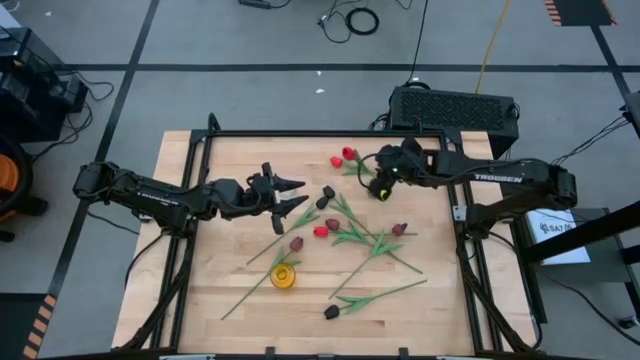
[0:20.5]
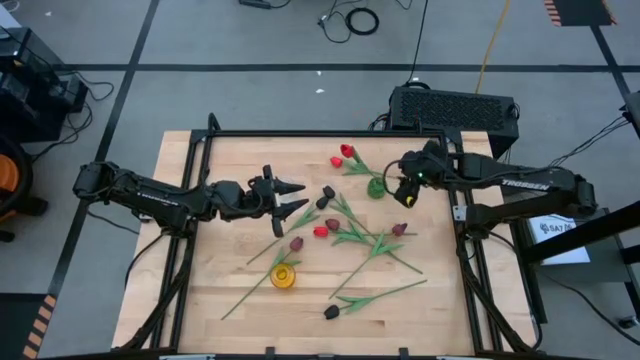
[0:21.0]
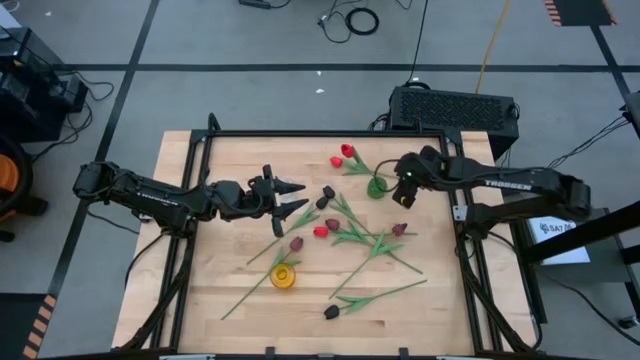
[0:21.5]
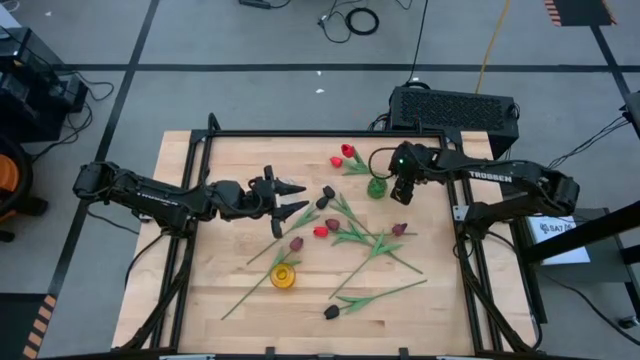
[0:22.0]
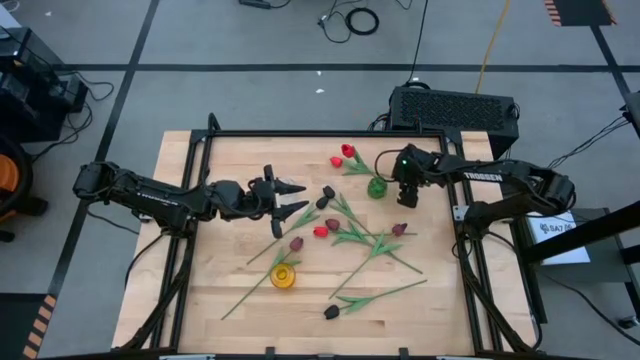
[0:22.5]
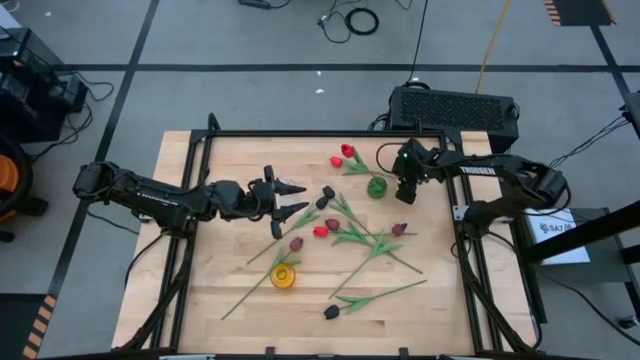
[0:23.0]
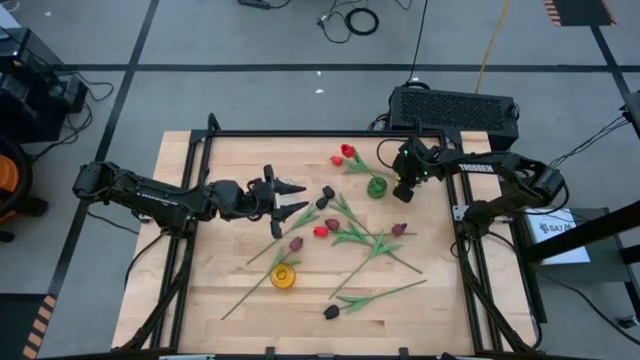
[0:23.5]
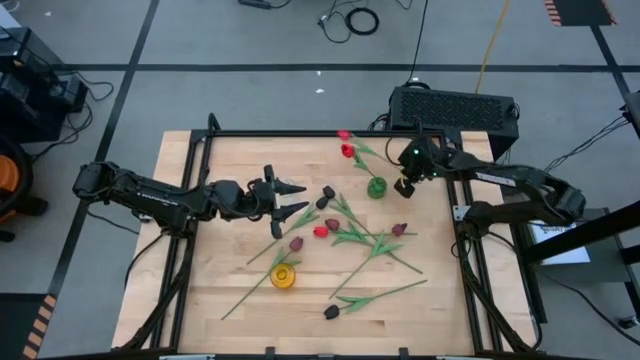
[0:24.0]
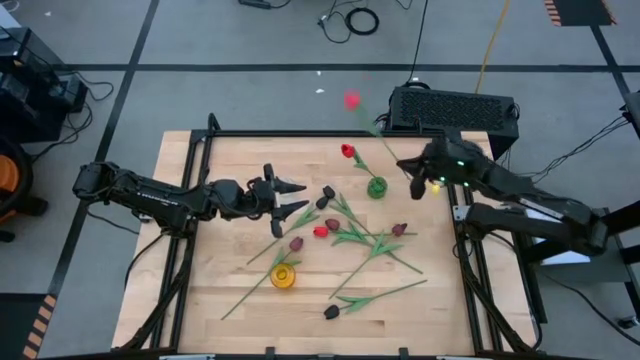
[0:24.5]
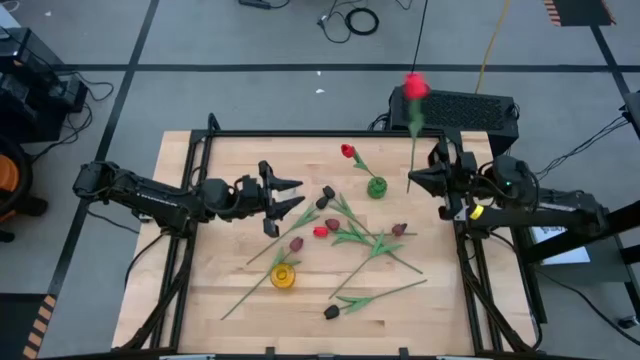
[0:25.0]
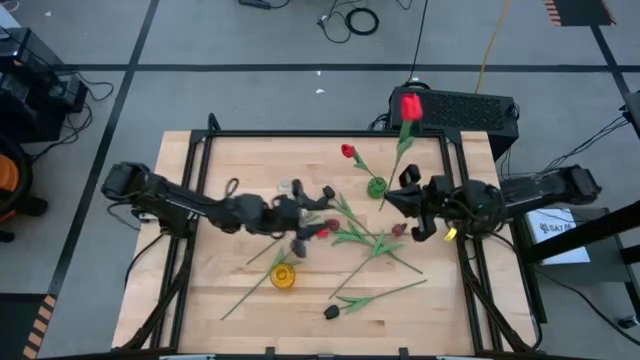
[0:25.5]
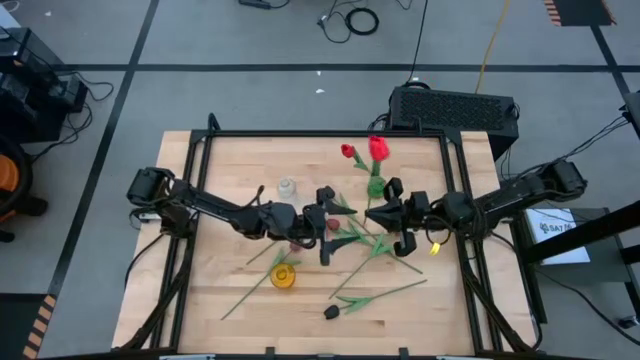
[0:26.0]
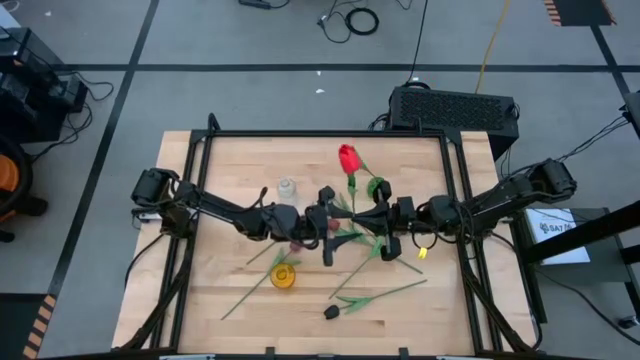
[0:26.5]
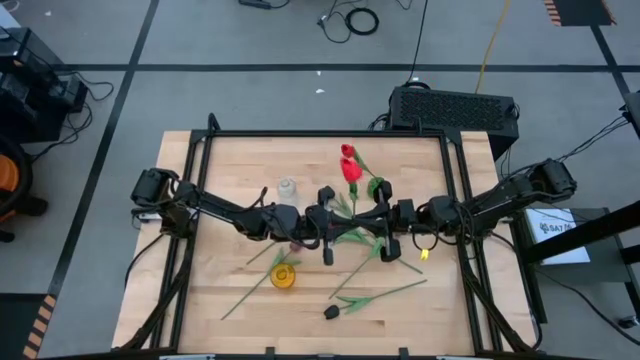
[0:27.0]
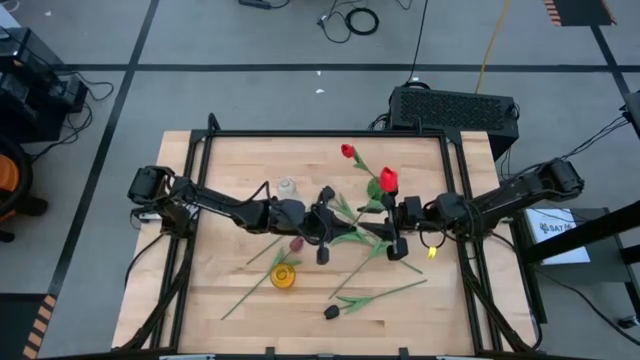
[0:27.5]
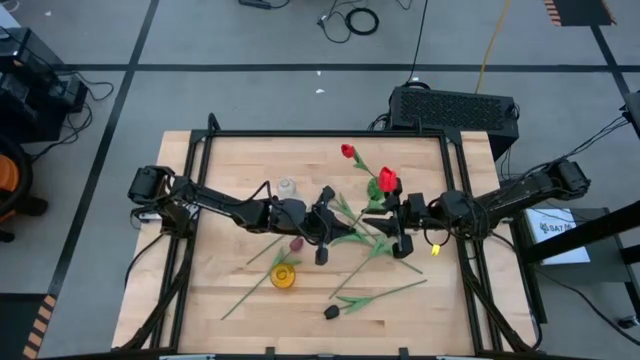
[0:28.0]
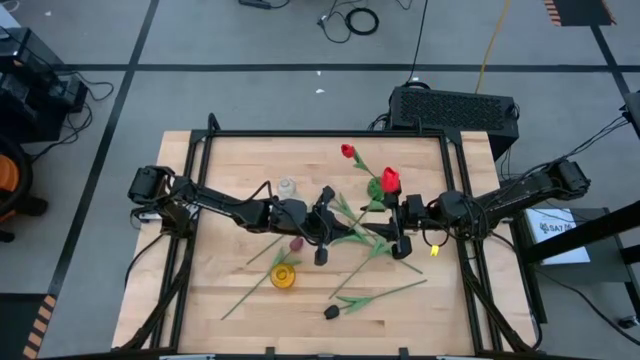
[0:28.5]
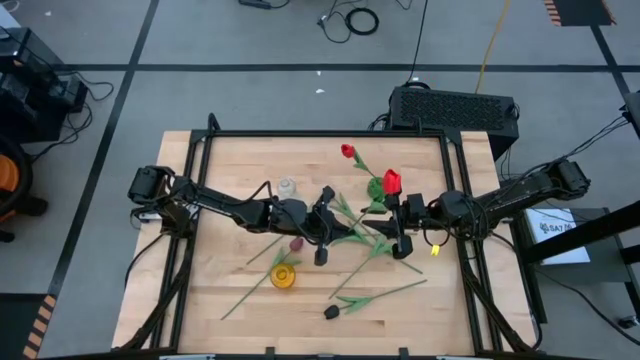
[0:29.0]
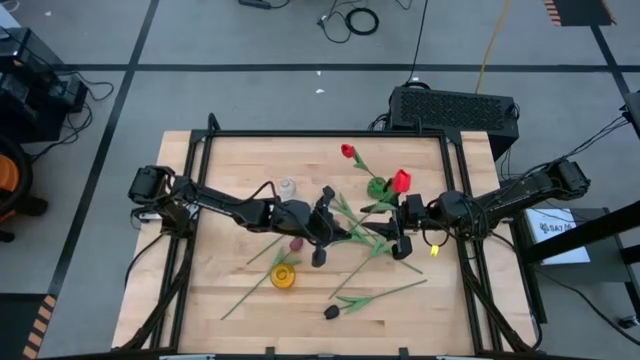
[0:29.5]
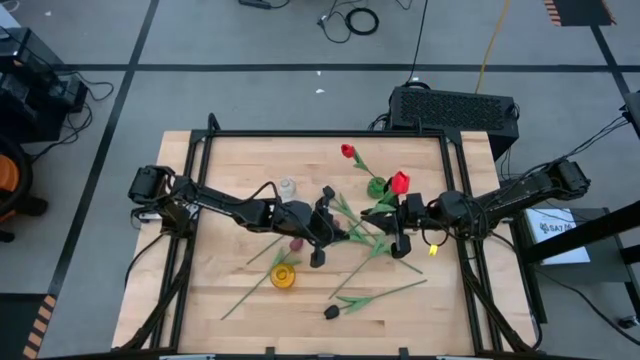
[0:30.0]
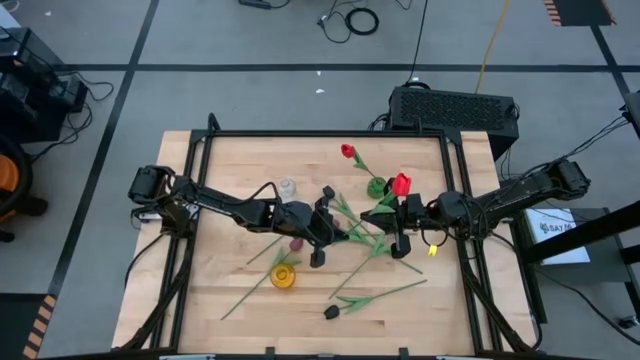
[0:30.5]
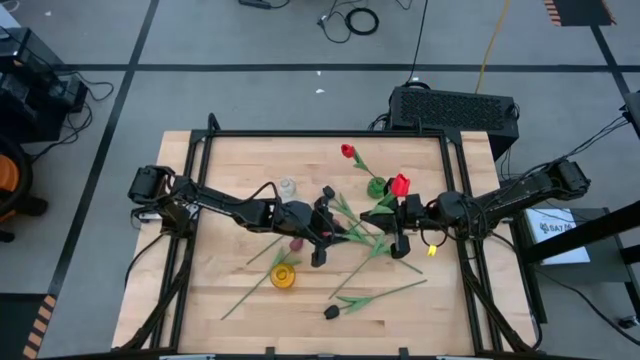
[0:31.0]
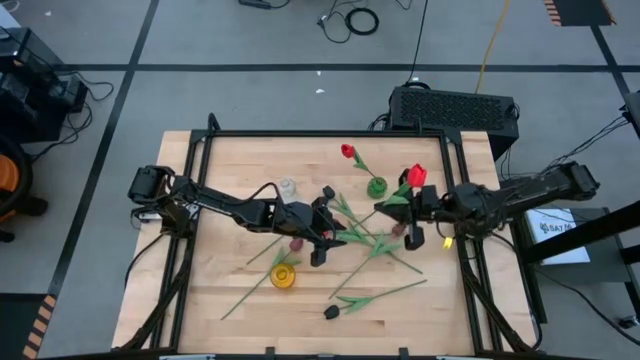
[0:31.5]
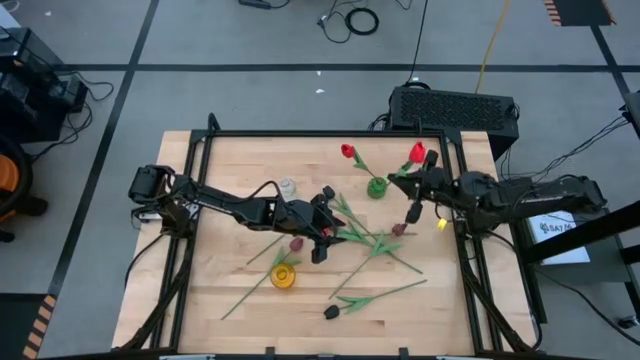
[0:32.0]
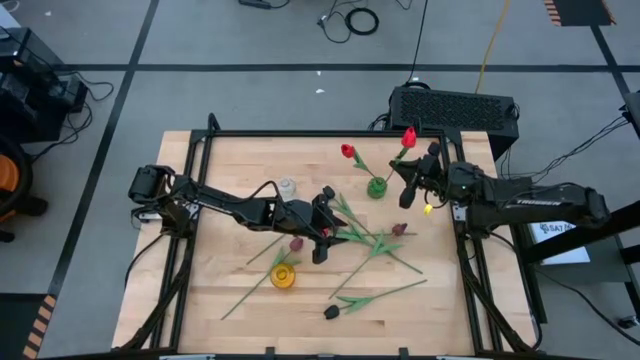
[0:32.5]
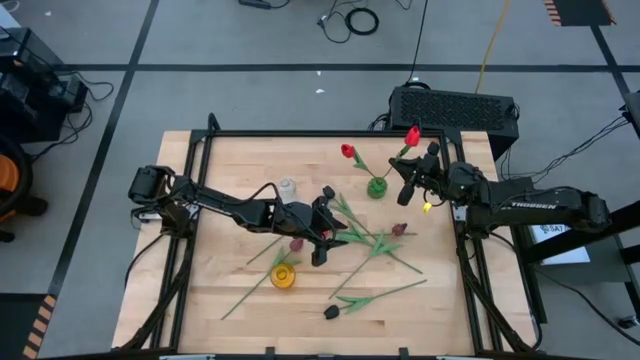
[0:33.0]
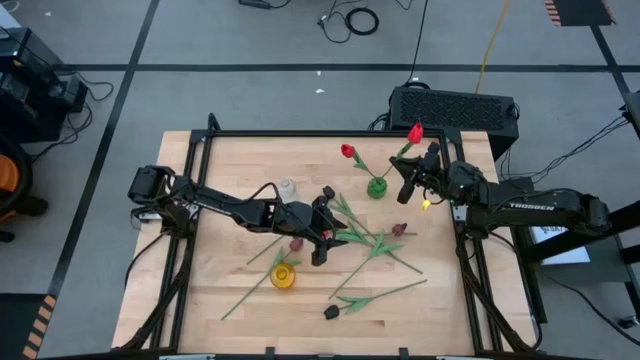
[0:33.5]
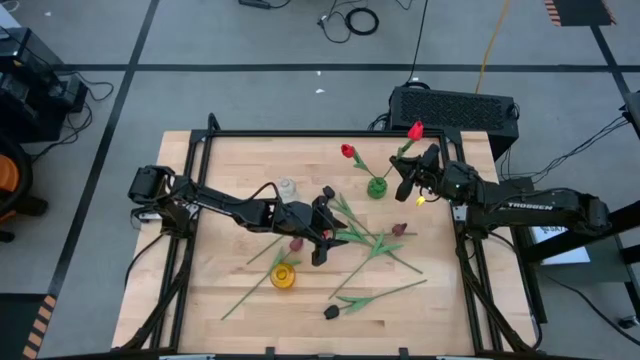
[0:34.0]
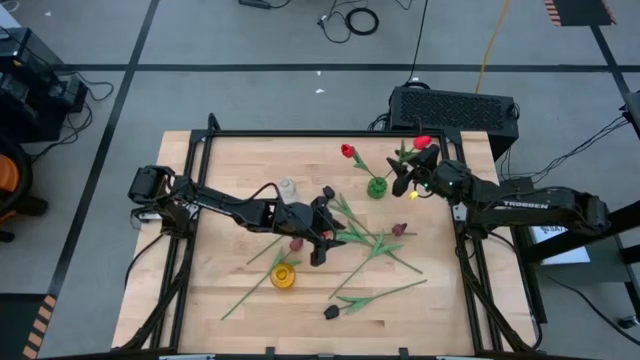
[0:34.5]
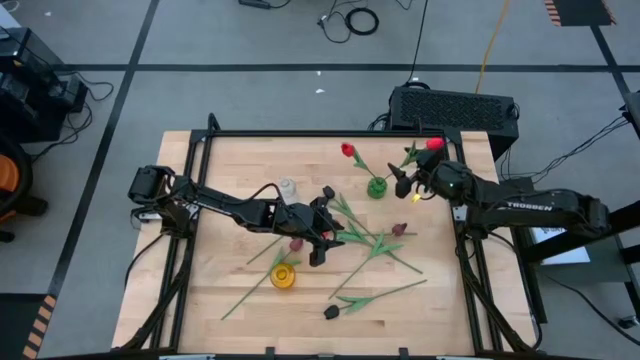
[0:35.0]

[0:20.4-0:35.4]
Task: Sort flowers into vase by color
Put the top red tulip into the green vase

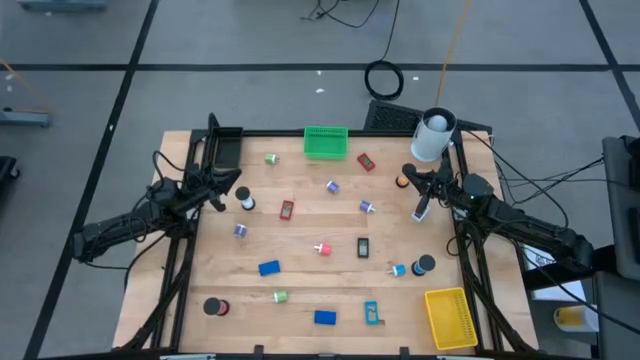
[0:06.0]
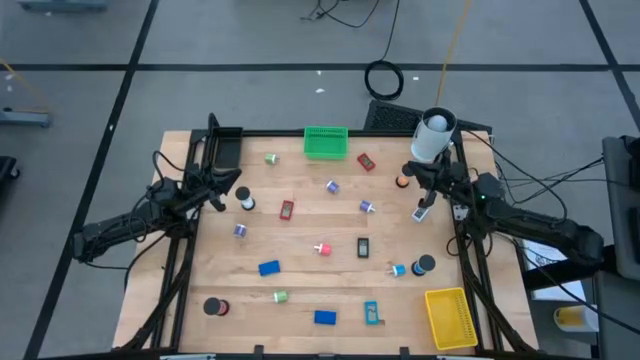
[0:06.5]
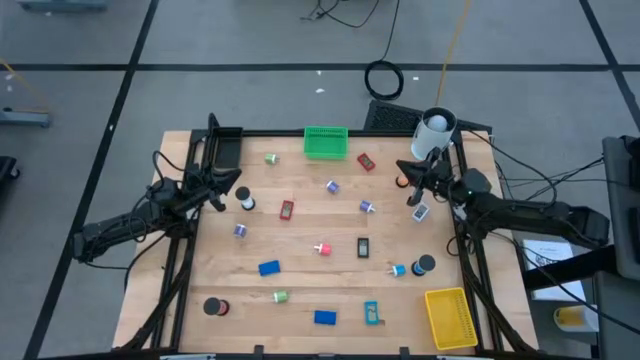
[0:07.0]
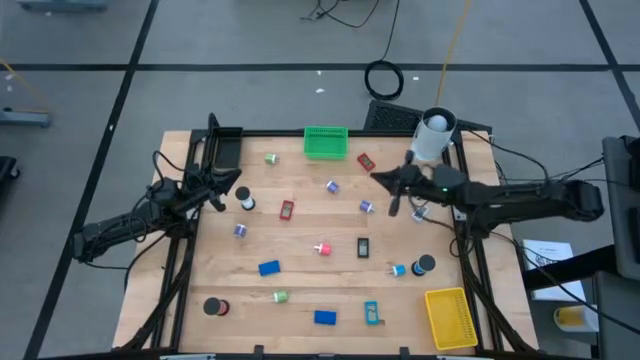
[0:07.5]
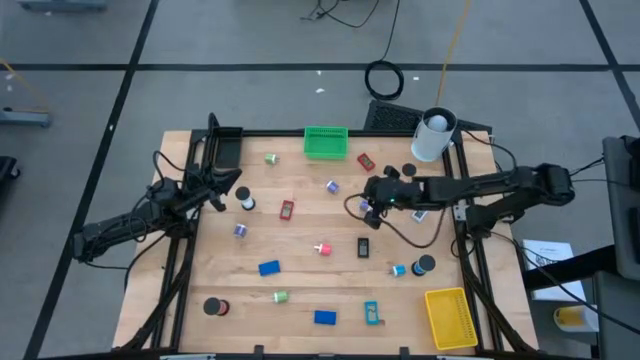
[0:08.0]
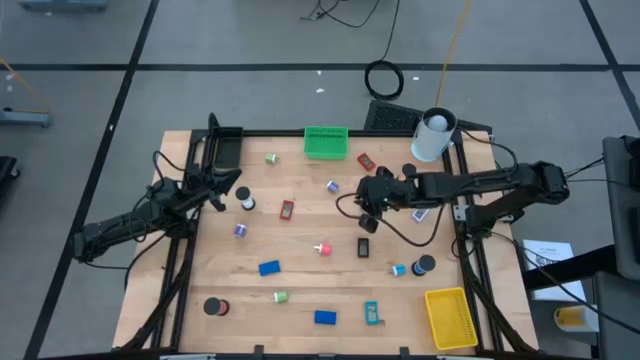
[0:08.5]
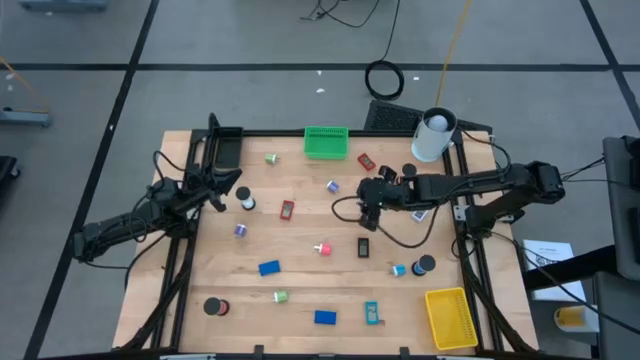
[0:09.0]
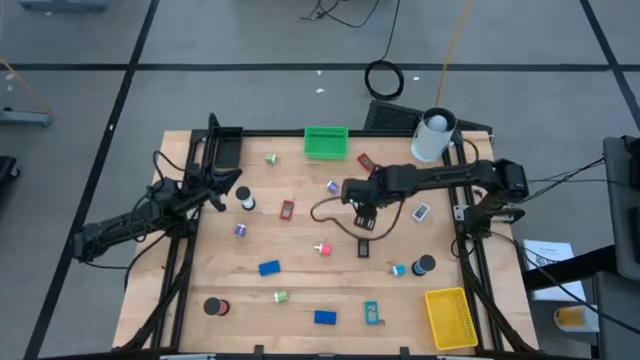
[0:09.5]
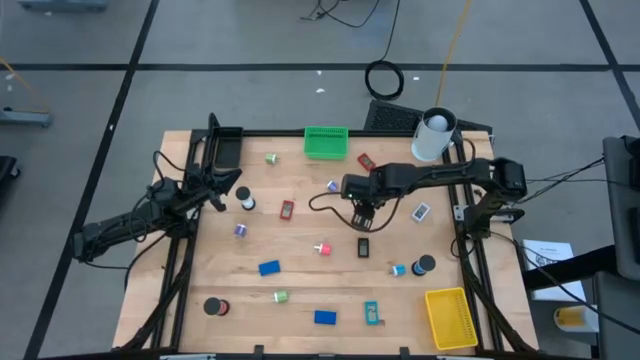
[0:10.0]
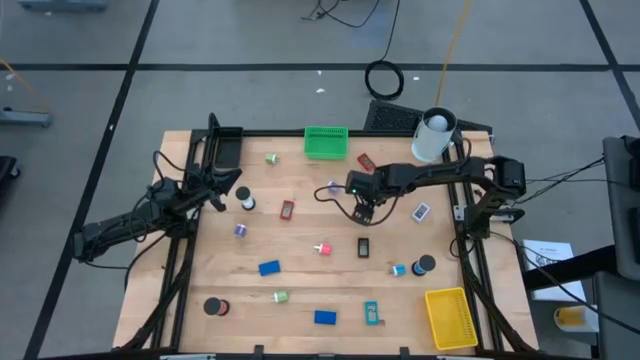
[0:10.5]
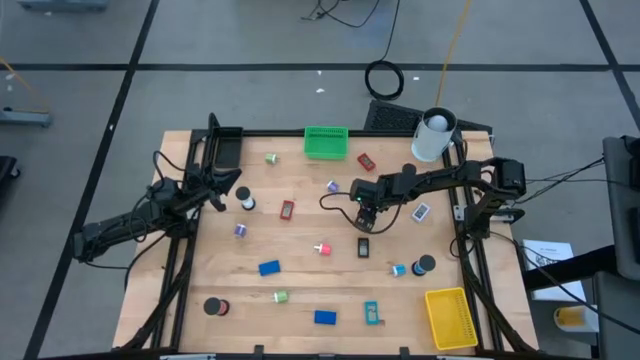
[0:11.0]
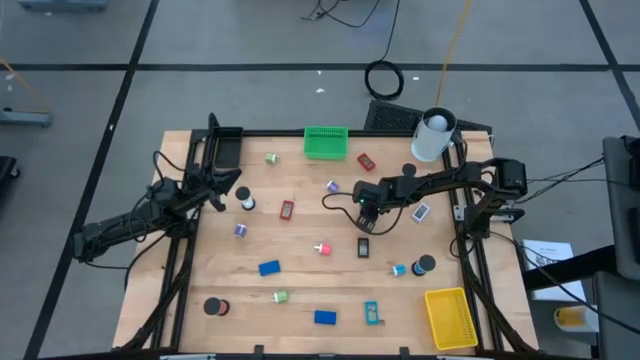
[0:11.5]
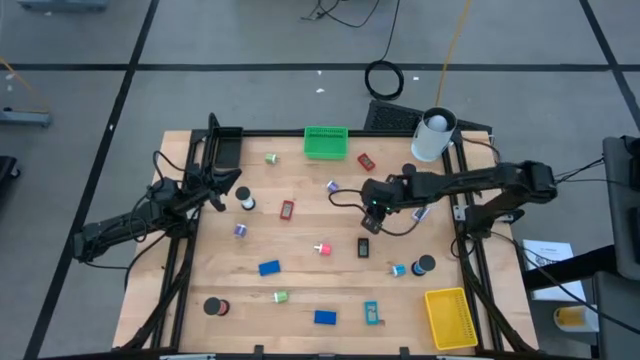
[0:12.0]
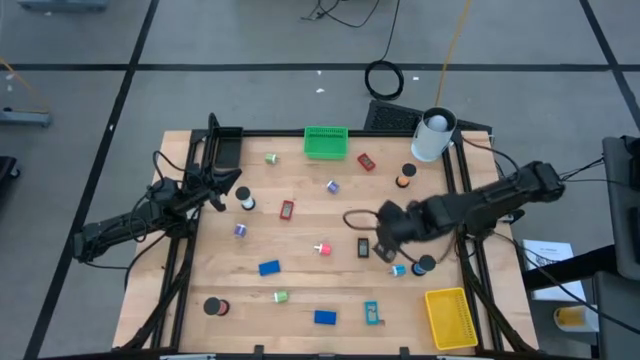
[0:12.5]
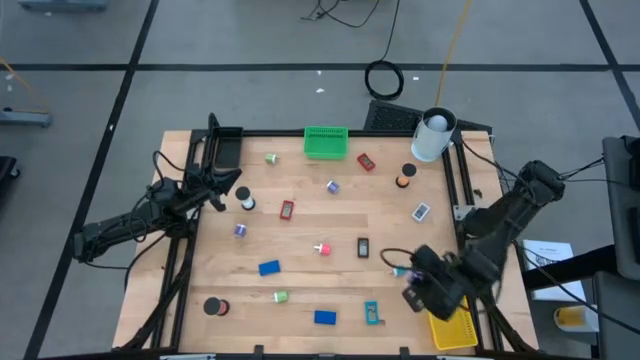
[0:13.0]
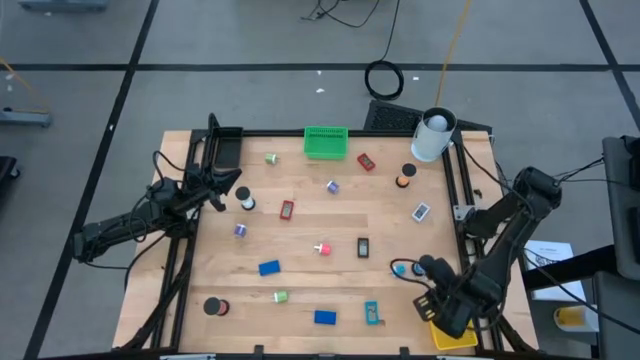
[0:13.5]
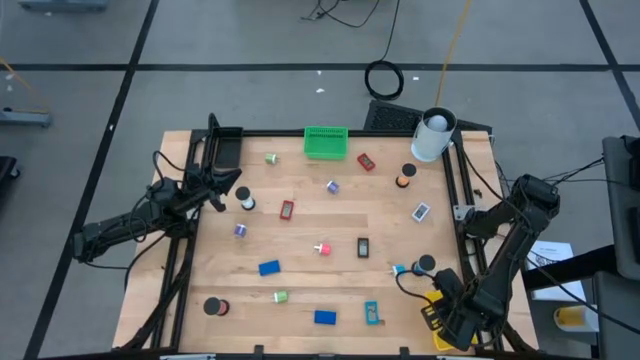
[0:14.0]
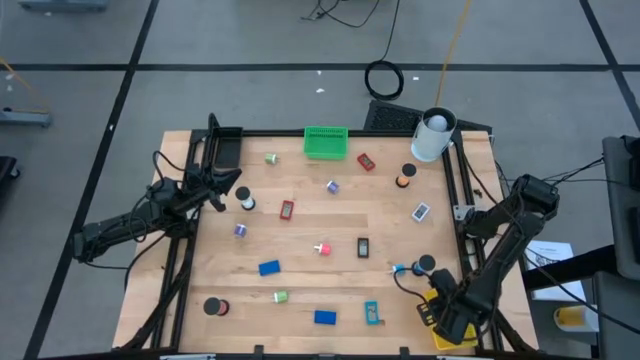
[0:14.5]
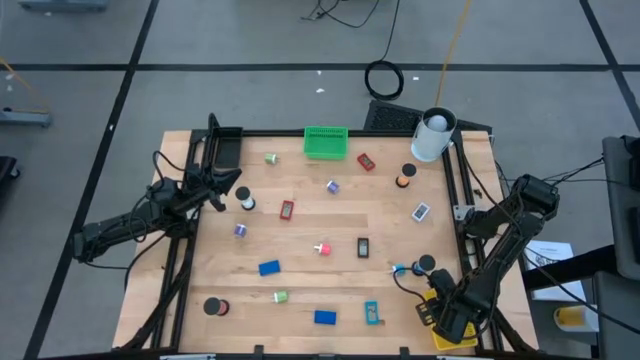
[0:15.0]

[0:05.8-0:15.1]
Task: Pick & Place Office items
Put the right purple charger adapter into the yellow basket
